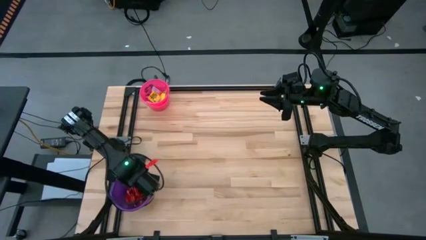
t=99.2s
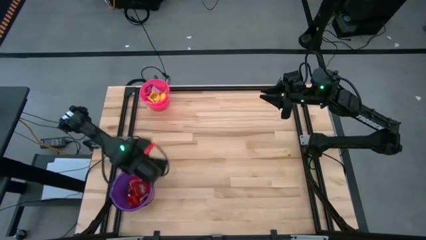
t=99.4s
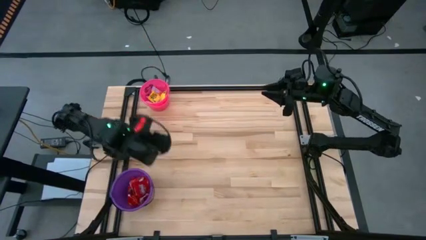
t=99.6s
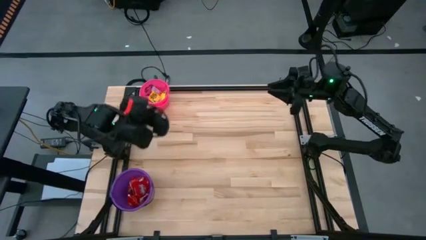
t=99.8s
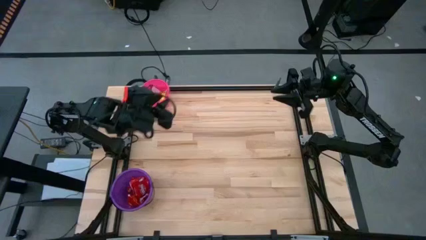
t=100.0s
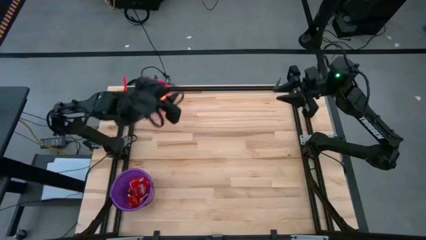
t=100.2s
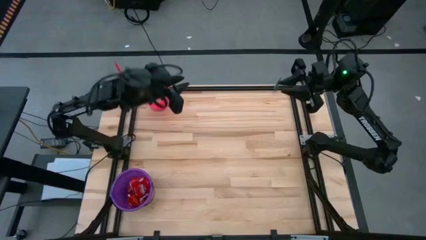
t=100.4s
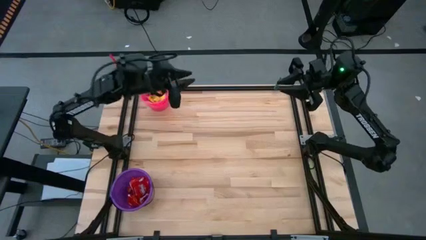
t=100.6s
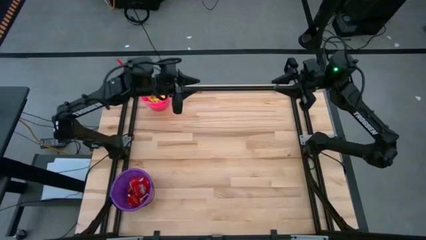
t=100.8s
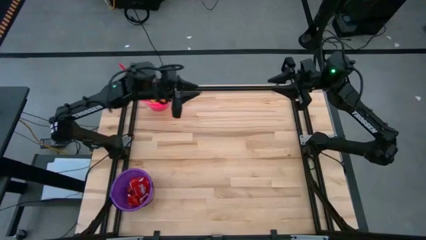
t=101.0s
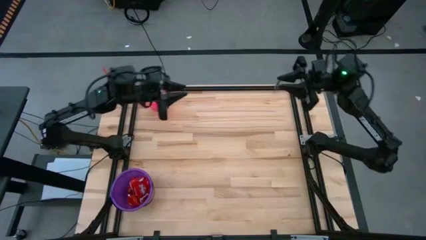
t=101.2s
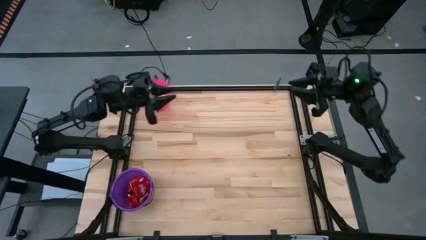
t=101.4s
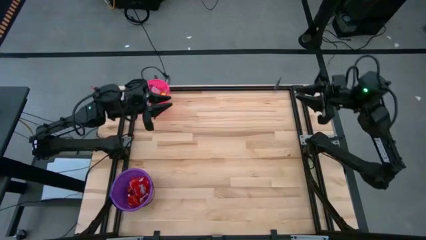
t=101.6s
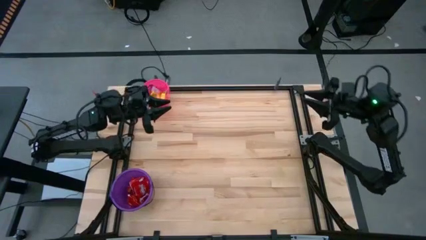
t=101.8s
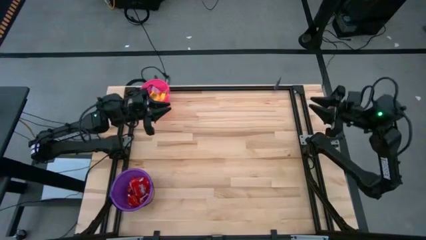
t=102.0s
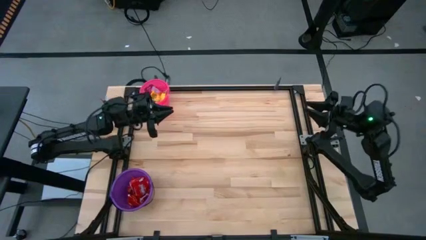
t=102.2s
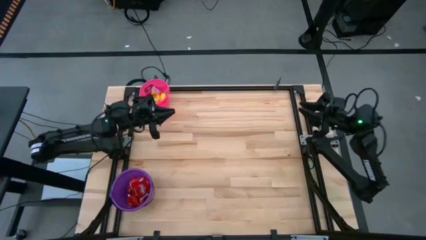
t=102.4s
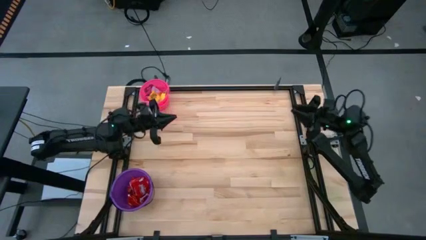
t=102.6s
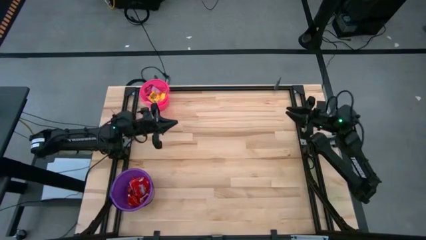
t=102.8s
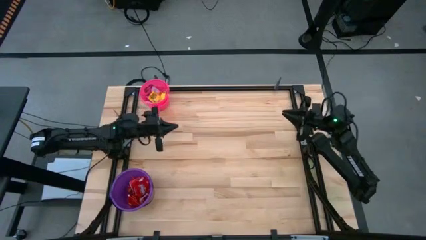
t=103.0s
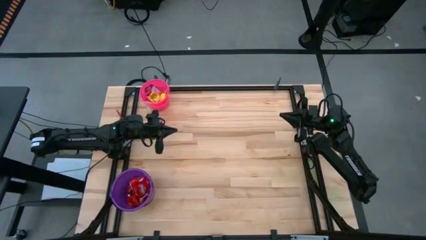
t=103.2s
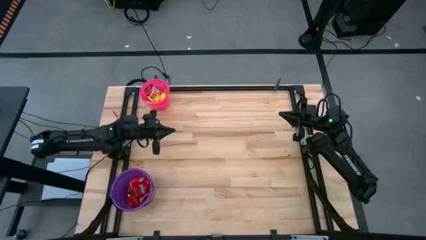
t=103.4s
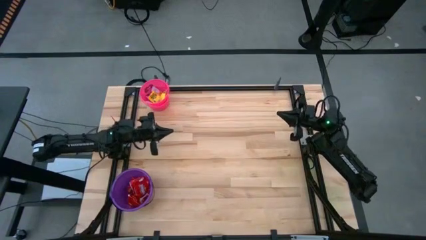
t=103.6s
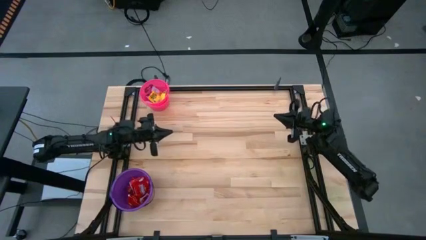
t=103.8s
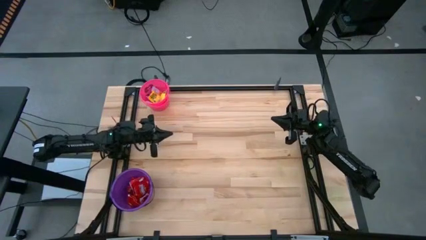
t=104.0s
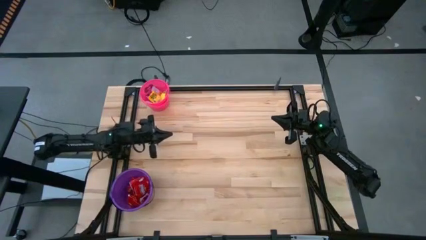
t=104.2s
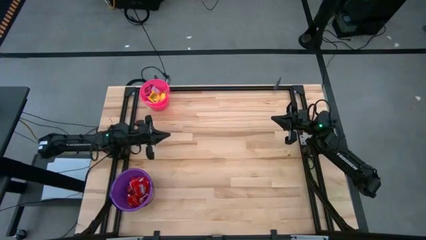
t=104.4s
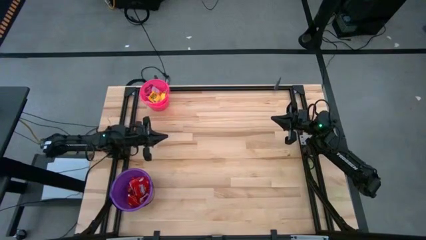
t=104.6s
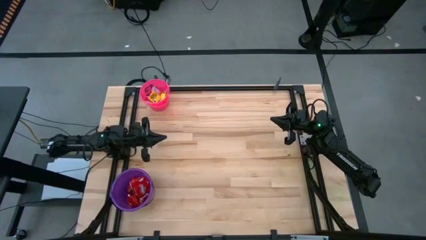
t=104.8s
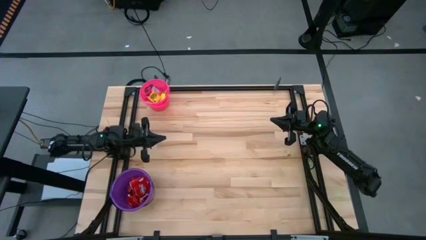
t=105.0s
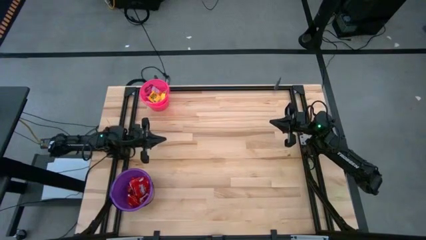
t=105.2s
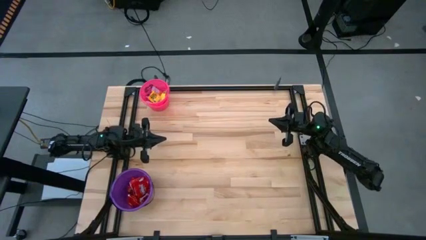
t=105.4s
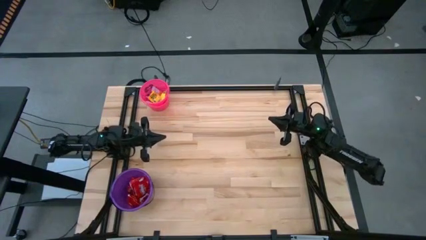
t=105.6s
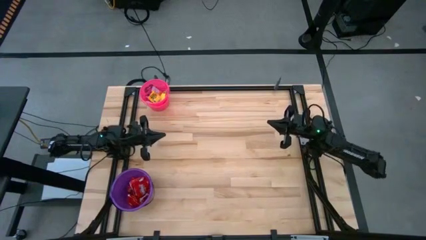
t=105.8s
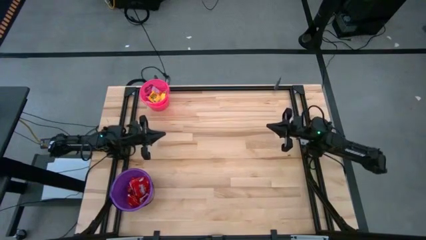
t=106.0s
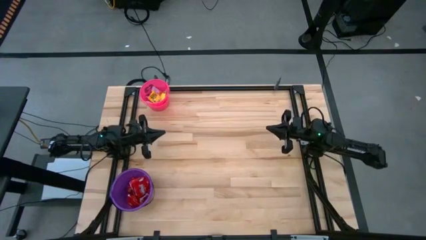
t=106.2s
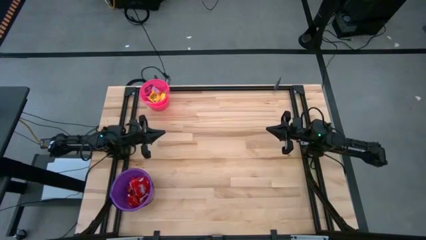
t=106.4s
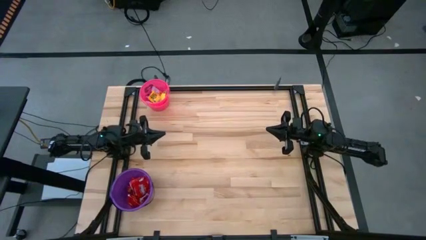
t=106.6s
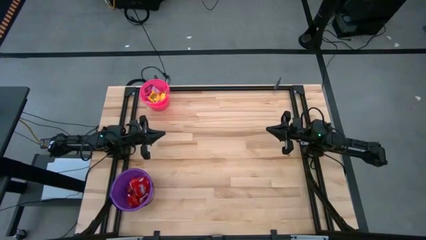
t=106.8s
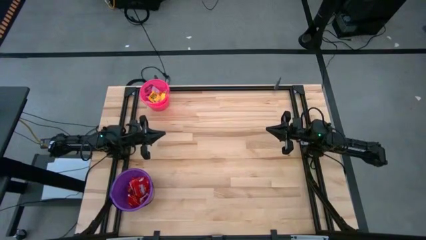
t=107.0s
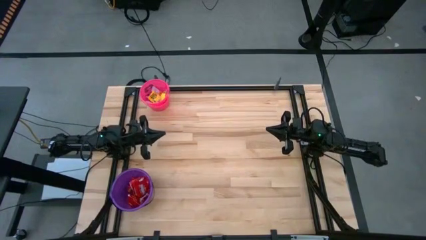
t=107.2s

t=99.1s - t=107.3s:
Task: Sort candy by brand, put in halloween buckets
Return to Home Position

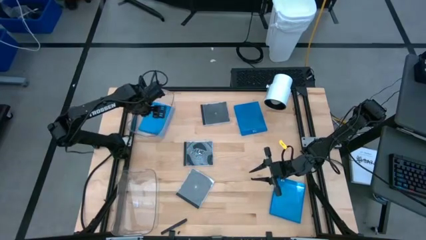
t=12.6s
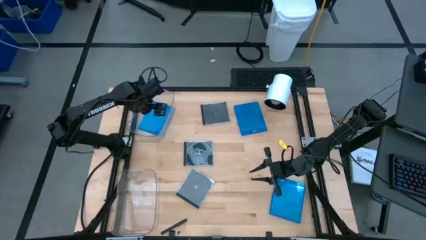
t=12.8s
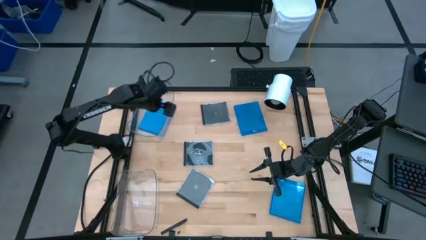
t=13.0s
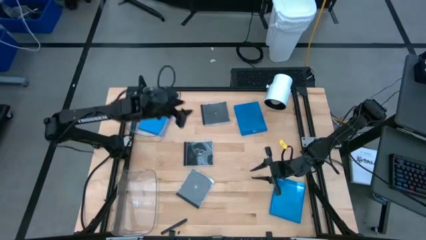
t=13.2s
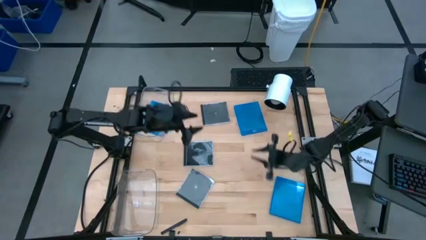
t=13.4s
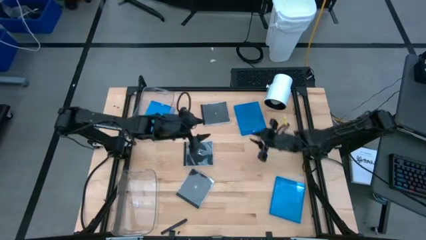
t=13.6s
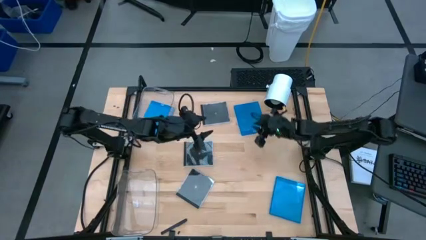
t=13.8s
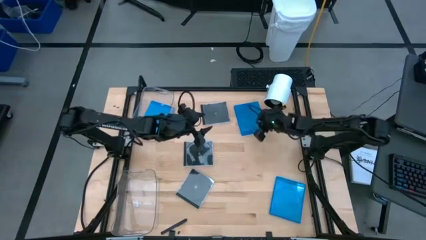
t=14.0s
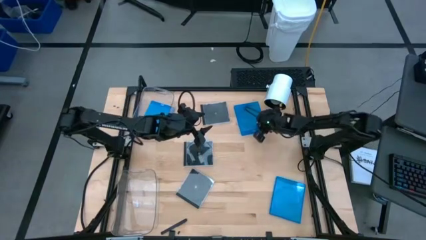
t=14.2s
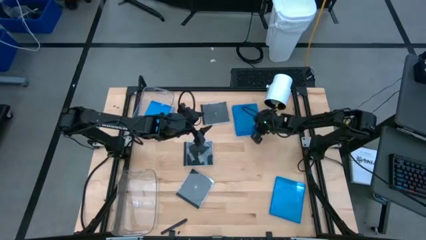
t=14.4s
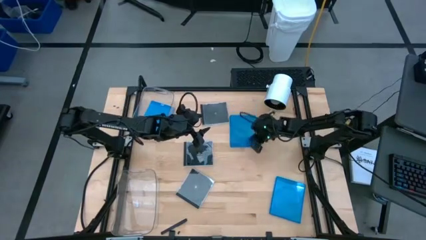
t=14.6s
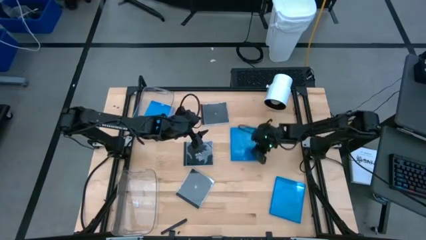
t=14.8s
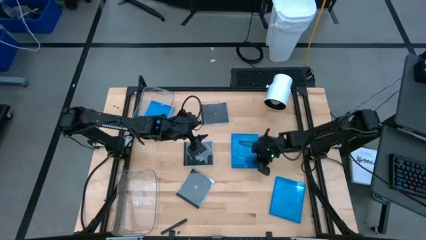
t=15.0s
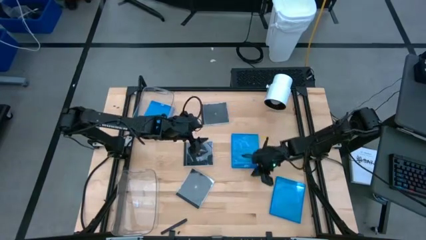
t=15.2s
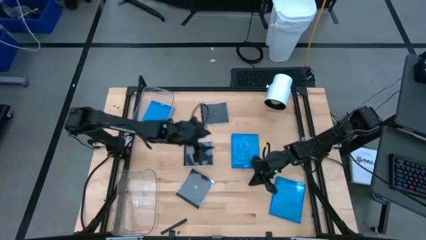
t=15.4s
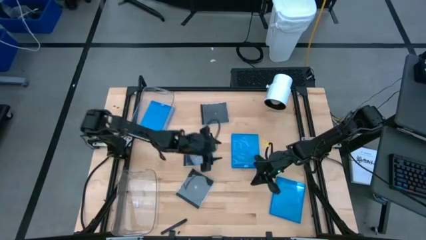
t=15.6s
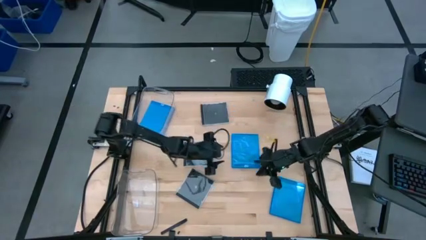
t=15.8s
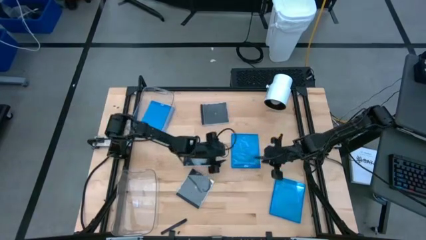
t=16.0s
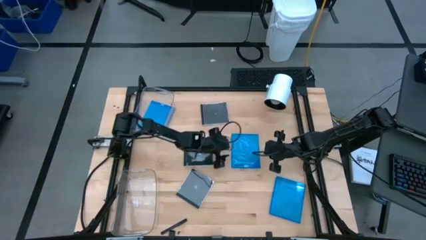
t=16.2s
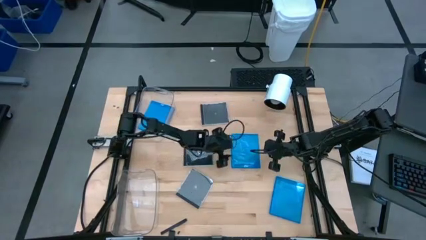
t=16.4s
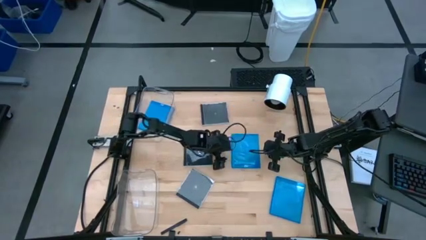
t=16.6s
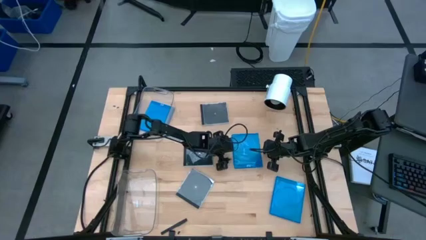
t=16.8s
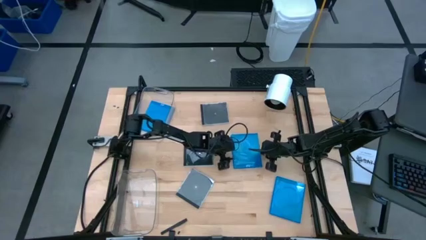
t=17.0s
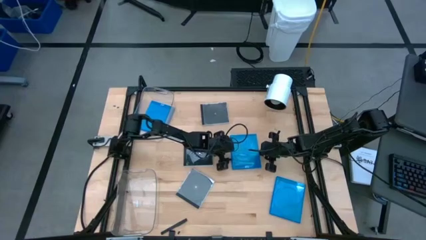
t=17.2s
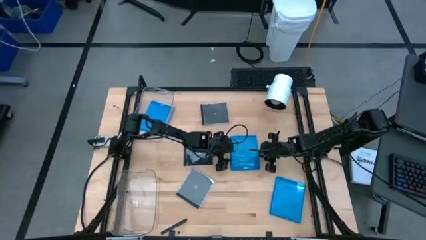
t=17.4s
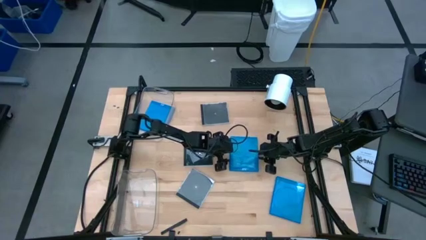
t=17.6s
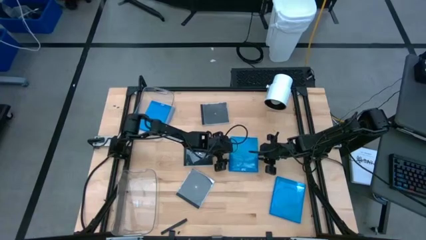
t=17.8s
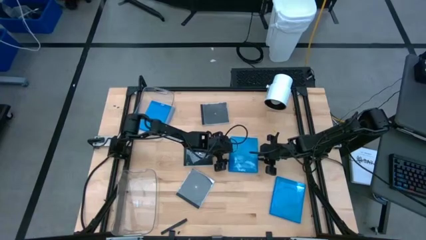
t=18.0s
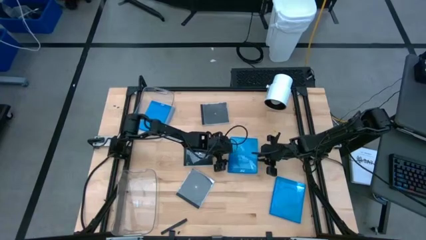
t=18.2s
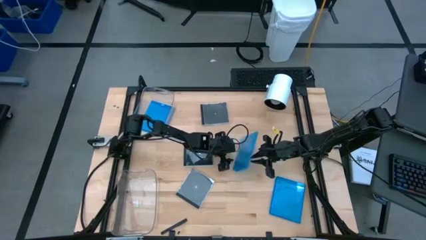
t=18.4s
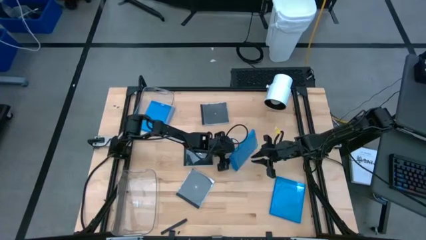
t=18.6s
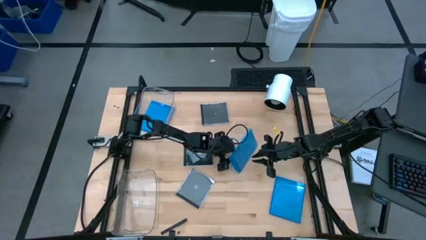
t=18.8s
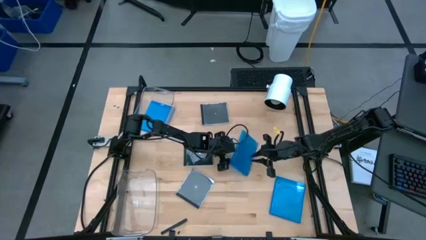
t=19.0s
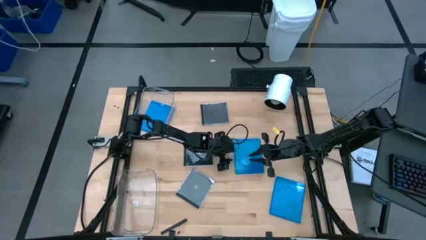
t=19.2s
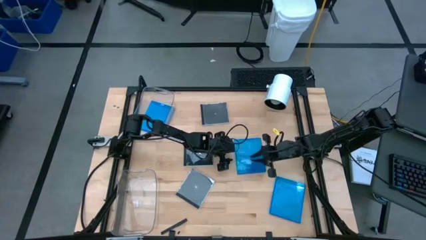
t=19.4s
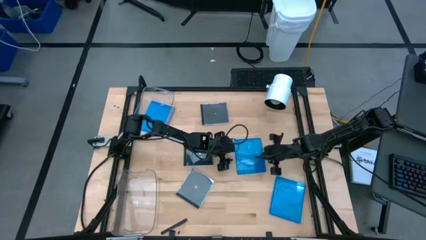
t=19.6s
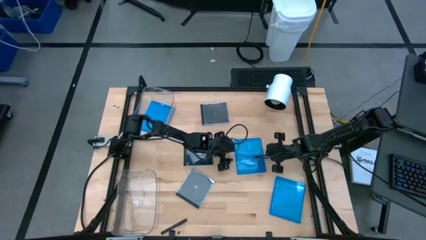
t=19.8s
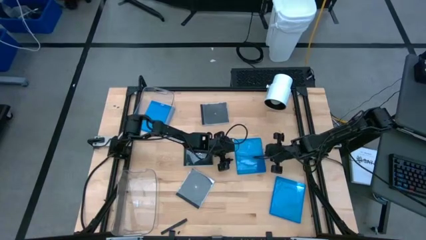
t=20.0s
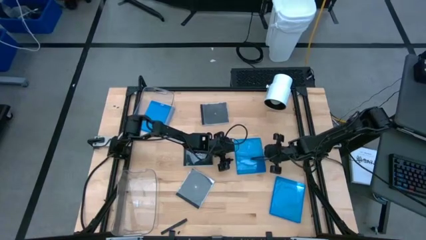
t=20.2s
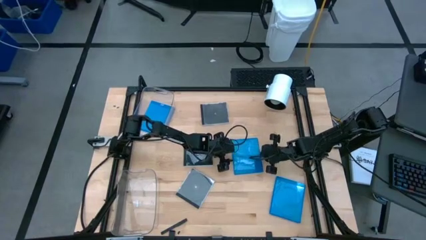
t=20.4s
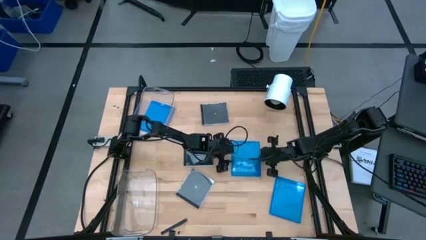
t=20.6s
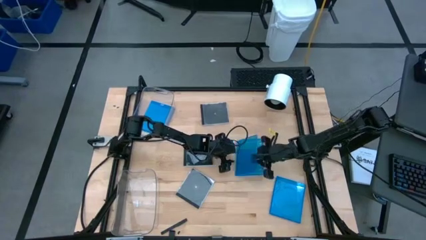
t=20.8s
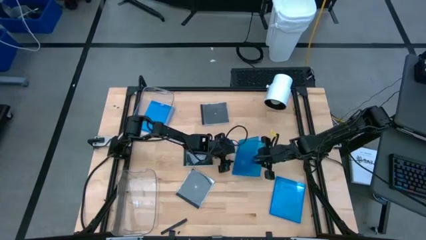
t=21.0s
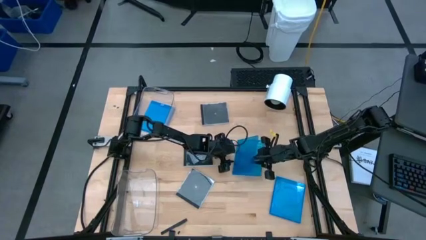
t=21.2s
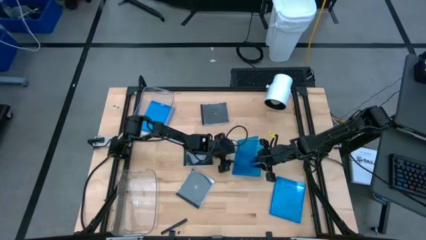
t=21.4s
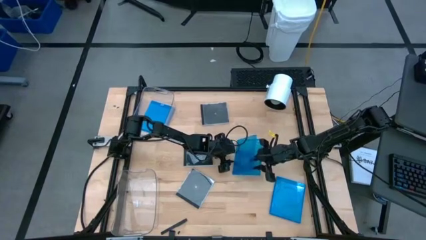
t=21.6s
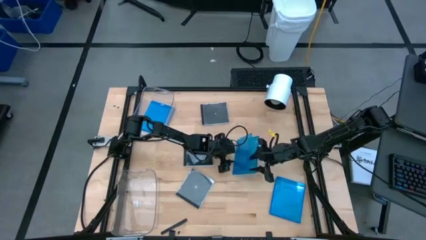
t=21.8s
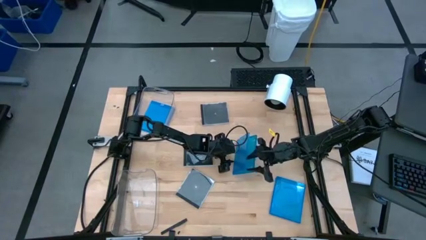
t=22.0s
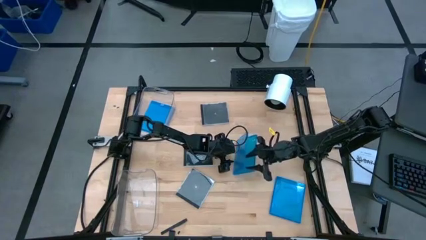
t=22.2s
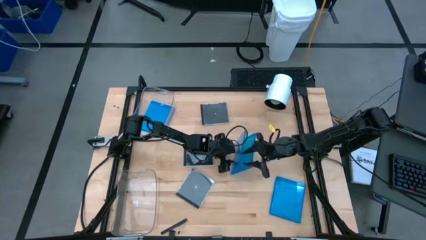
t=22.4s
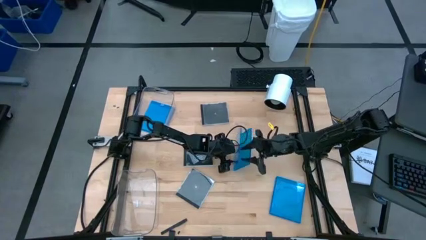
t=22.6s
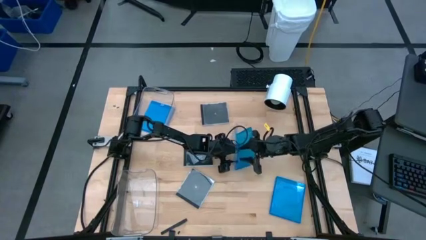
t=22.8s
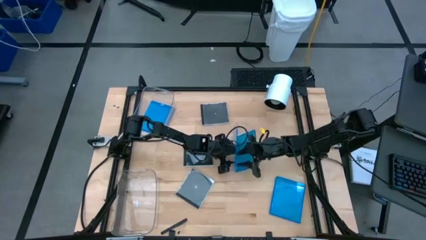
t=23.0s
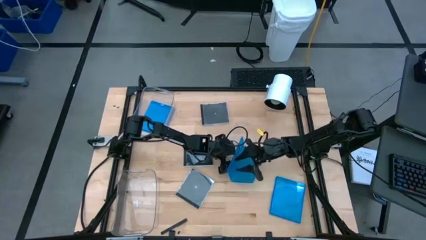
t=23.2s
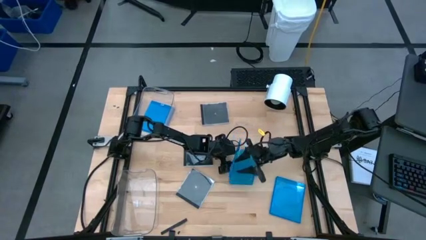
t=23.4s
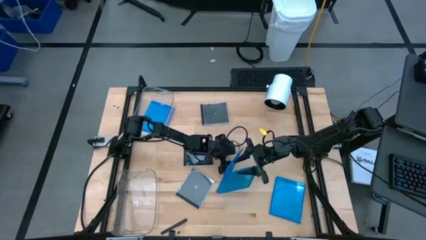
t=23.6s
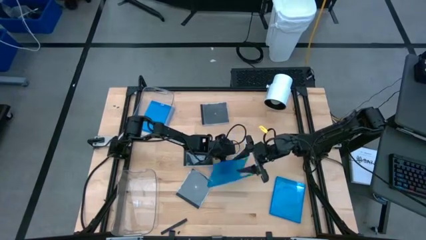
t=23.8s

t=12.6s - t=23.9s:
Task: Pick & place jewel cases by type
Put the top blue CD case into the top transparent bin
